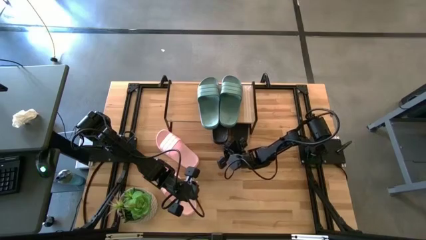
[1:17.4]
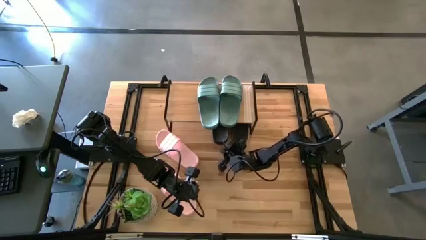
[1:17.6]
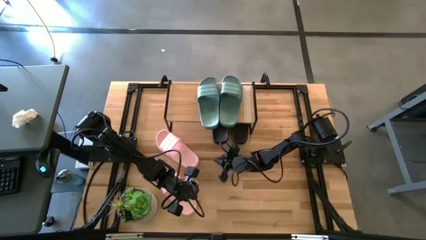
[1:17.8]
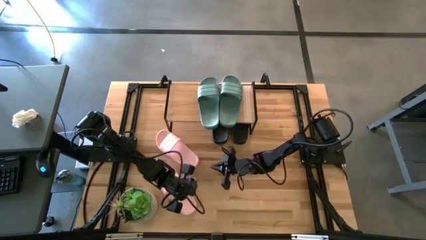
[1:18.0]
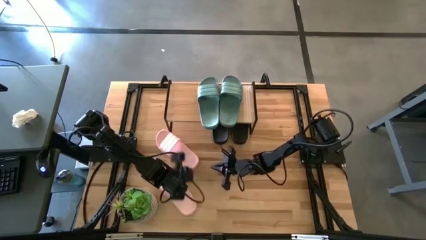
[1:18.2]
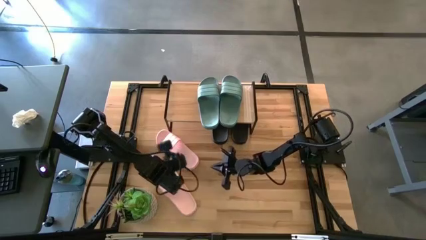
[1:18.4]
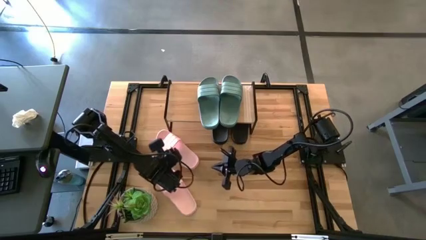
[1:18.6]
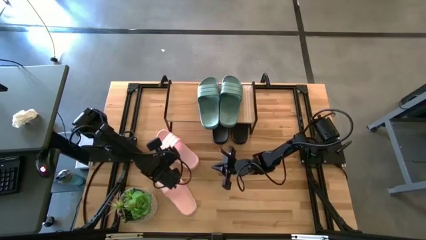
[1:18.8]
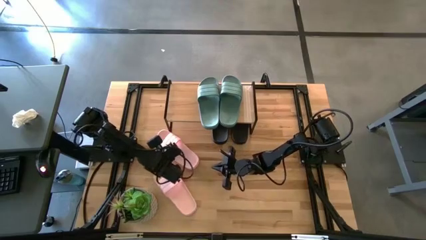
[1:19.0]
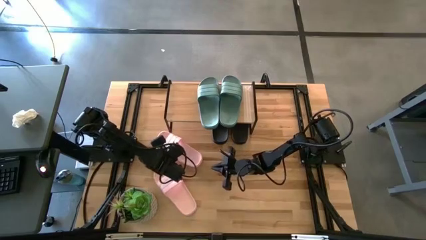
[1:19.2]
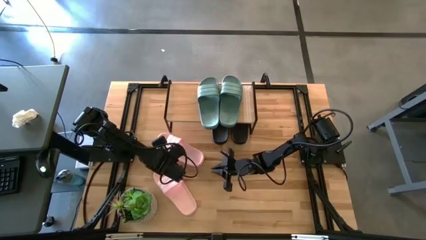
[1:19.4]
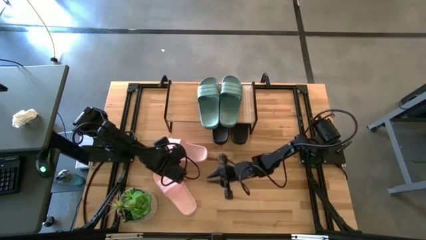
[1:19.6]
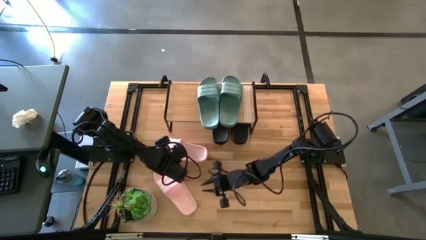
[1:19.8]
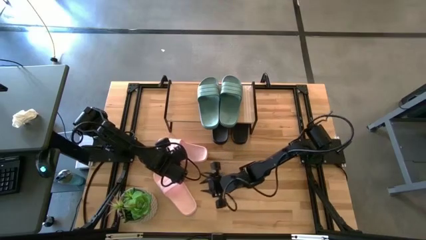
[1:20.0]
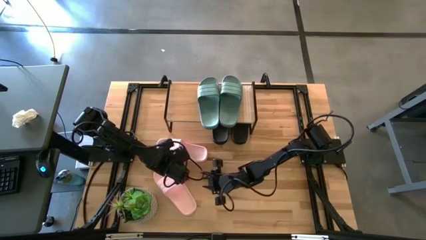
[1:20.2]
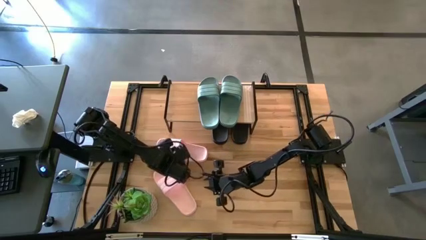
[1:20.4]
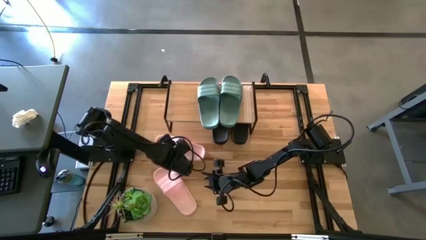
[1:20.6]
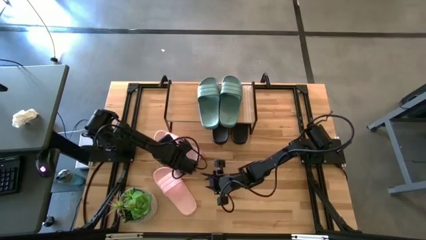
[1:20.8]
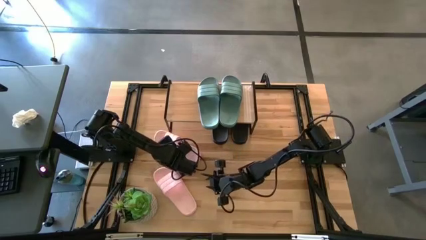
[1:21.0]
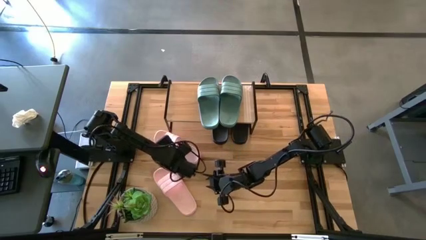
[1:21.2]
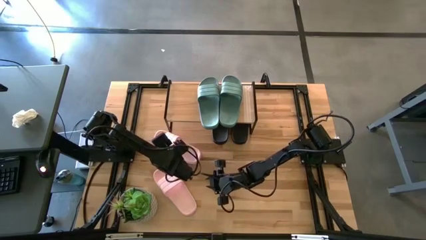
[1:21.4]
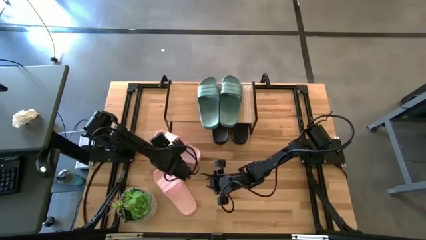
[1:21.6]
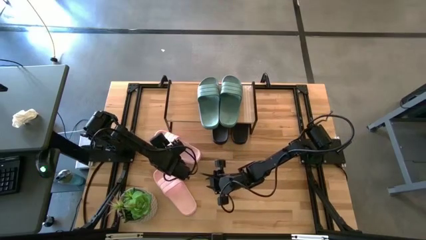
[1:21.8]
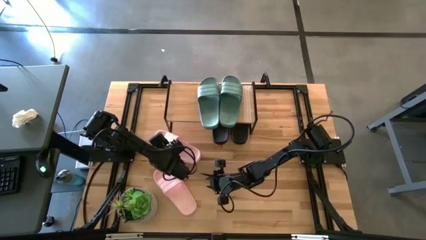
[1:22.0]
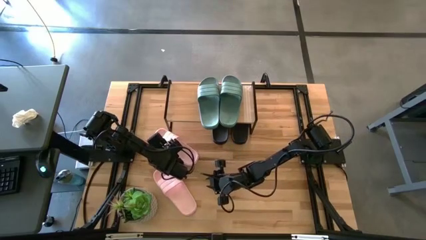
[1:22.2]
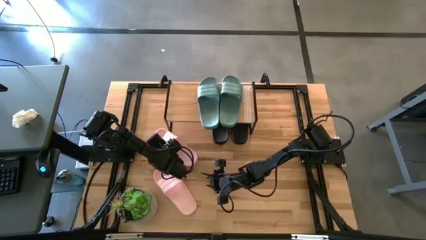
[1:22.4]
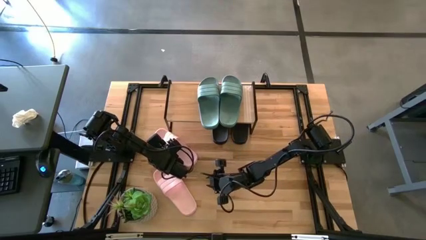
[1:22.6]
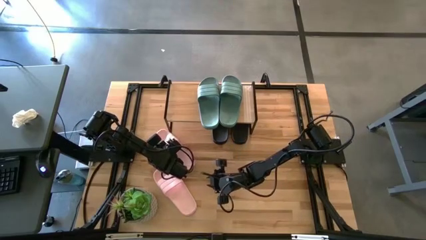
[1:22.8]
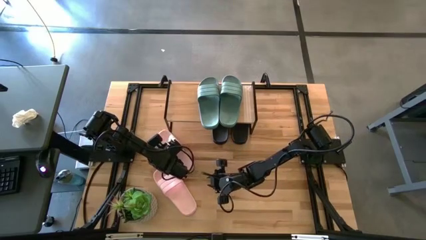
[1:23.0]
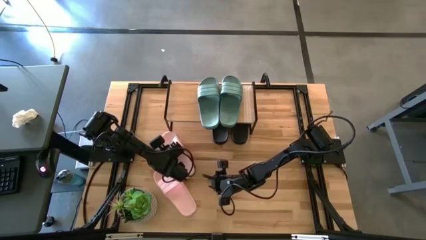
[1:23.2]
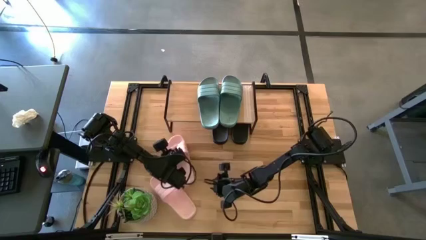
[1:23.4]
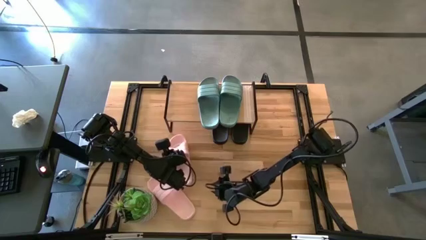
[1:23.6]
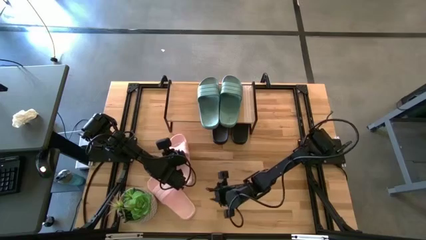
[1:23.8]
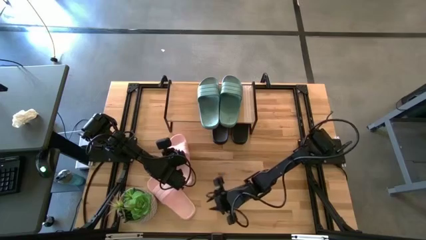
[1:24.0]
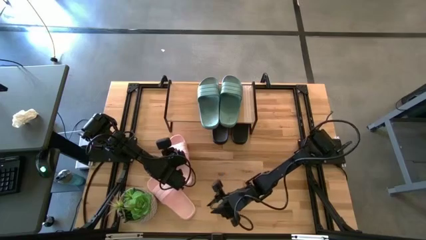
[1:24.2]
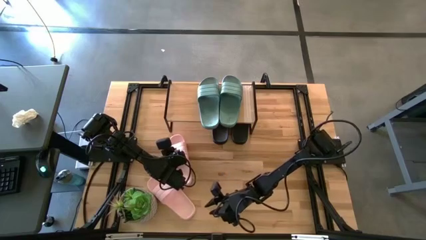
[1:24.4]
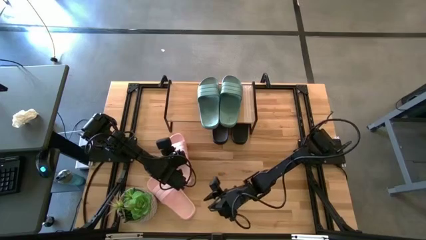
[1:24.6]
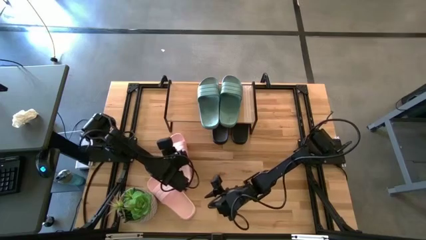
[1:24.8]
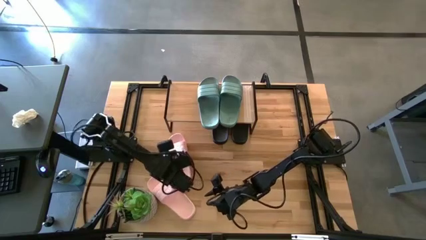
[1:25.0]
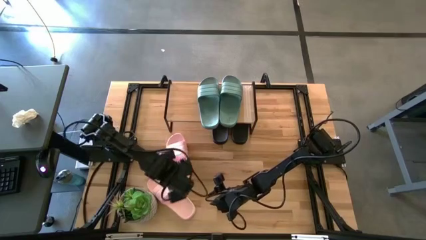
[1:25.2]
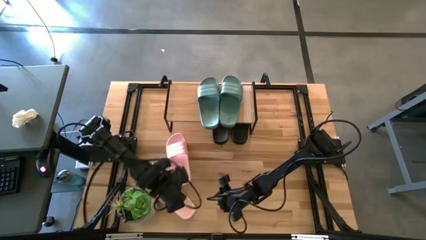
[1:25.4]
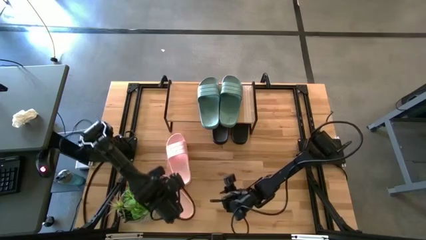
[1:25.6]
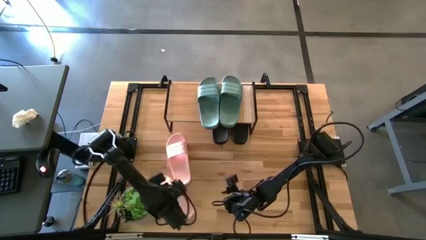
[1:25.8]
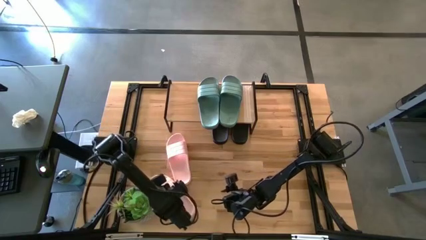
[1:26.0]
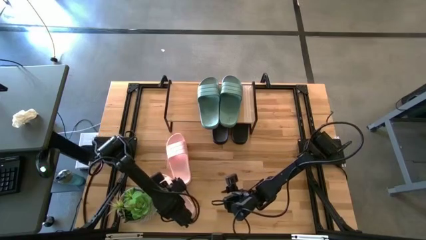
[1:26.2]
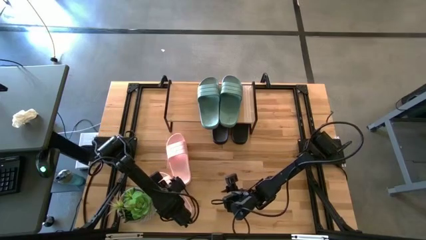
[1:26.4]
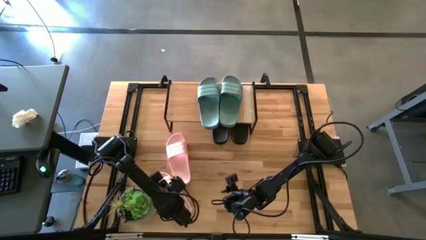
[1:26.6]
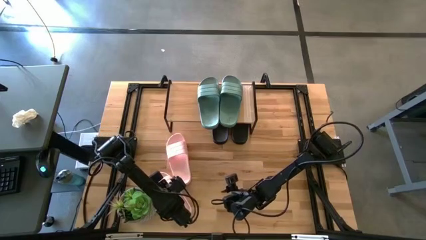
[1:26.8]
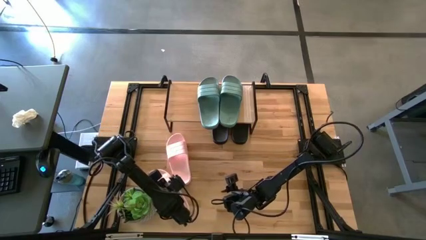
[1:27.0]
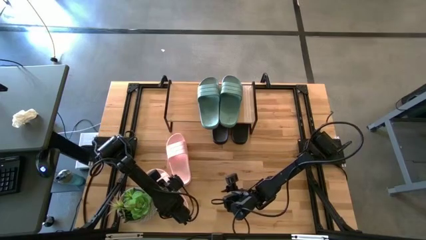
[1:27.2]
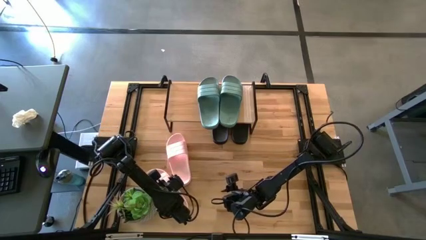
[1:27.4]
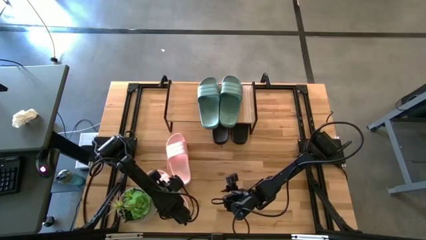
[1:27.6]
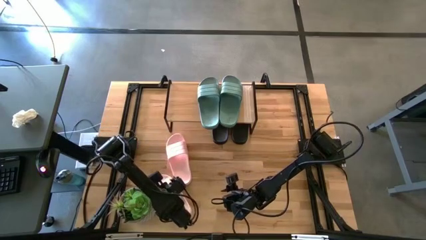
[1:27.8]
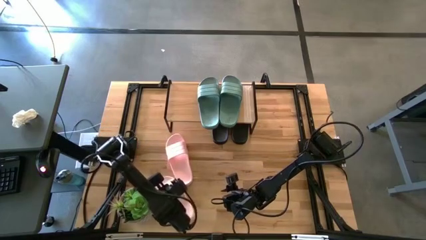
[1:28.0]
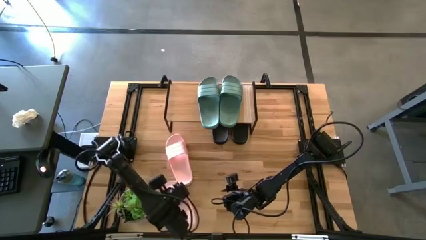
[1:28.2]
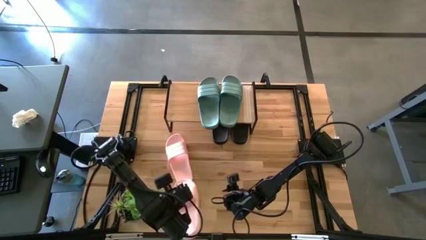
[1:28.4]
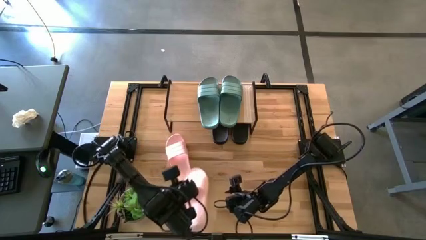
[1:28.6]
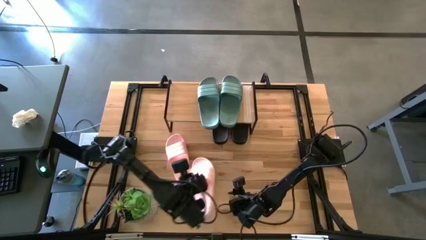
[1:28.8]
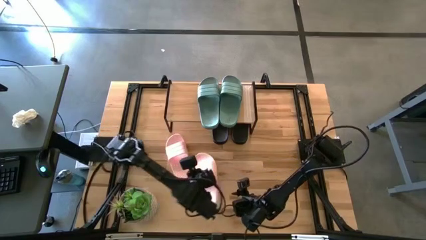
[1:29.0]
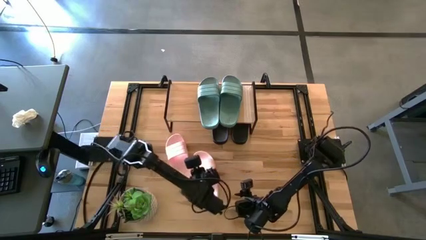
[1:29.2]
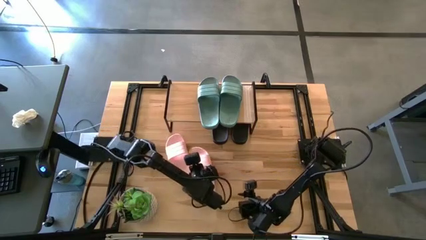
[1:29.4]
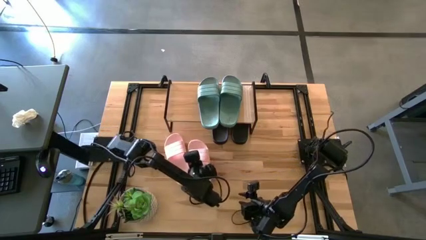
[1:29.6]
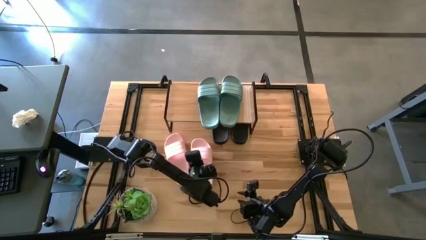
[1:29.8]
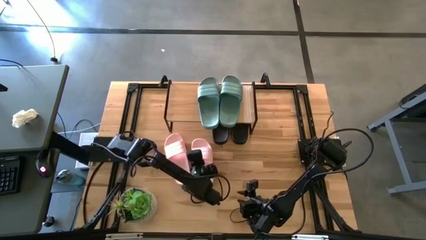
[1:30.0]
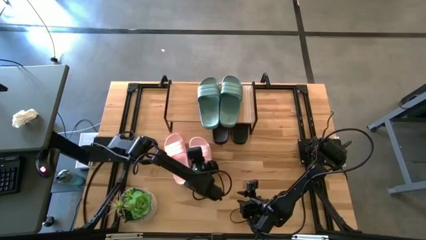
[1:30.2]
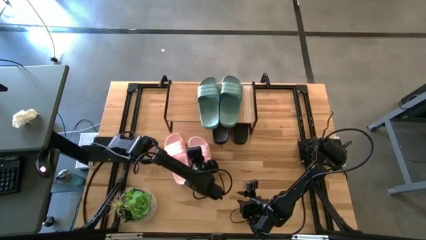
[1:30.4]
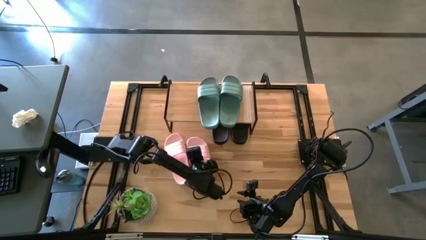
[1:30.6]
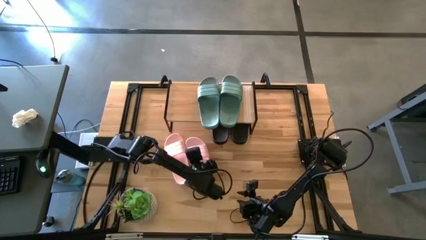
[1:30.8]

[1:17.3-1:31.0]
Task: Pick and place slides into the shelf
Adjust the pink slippers
